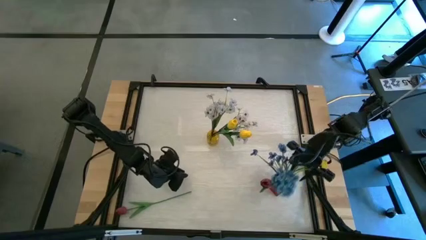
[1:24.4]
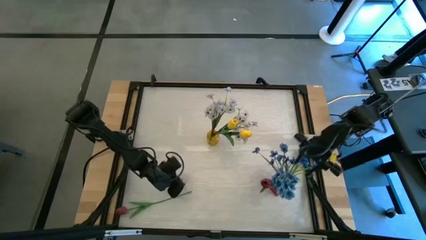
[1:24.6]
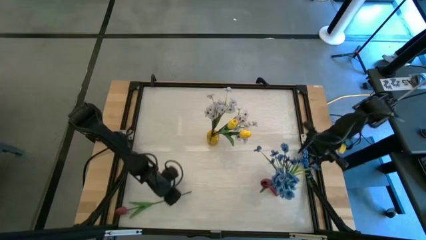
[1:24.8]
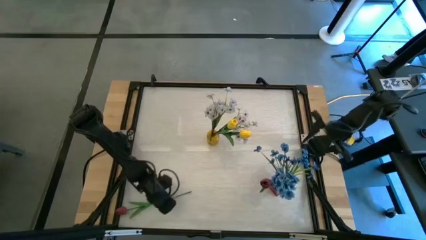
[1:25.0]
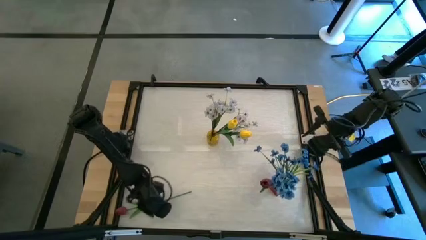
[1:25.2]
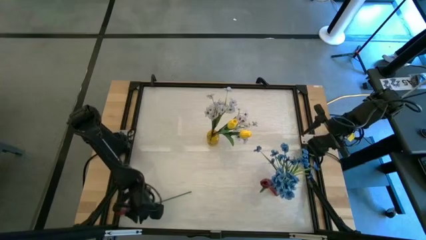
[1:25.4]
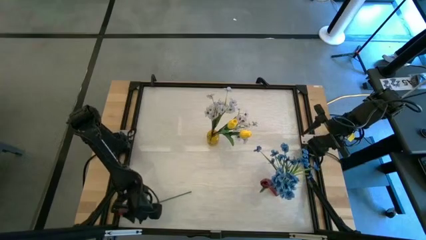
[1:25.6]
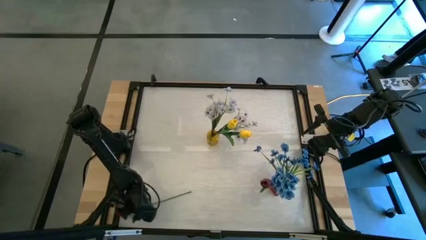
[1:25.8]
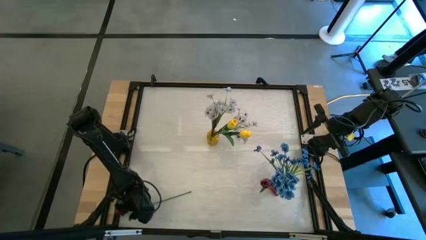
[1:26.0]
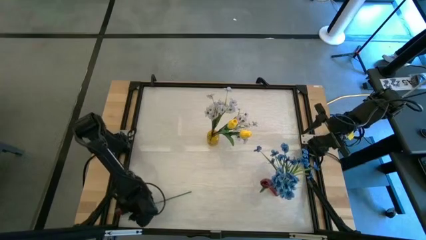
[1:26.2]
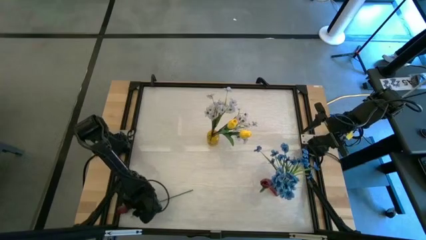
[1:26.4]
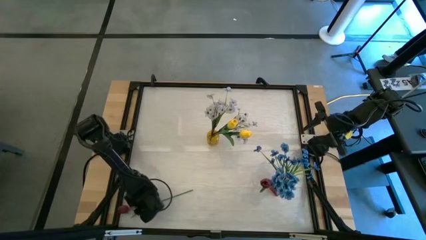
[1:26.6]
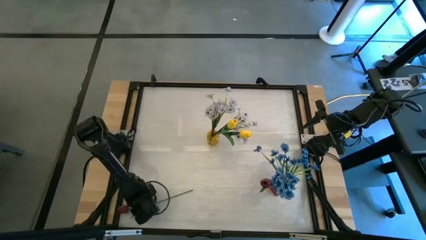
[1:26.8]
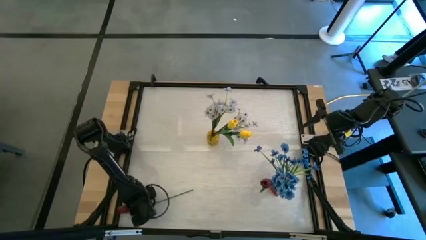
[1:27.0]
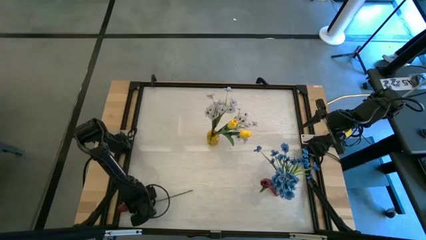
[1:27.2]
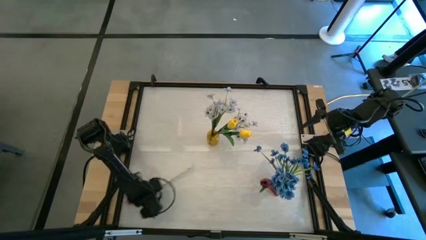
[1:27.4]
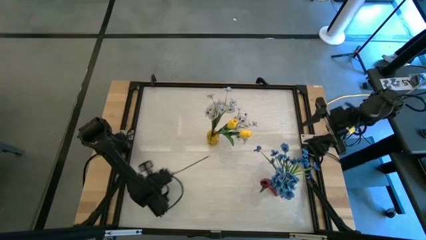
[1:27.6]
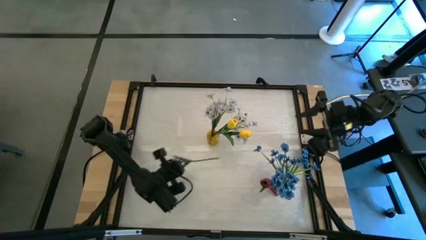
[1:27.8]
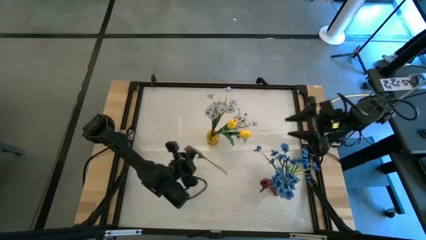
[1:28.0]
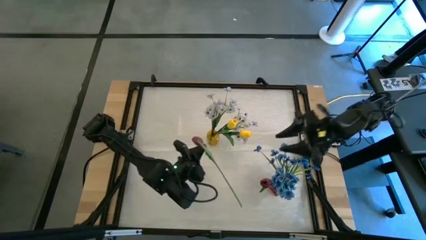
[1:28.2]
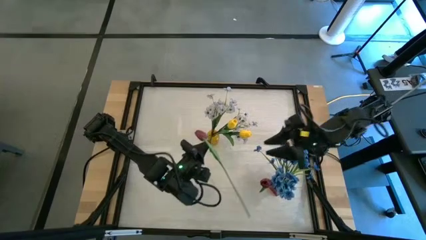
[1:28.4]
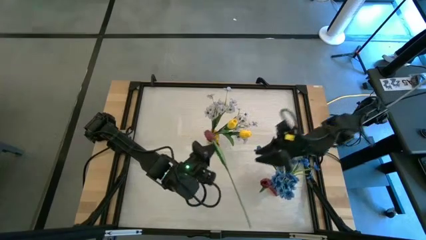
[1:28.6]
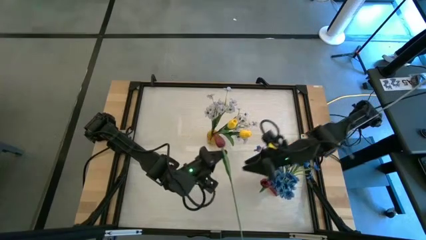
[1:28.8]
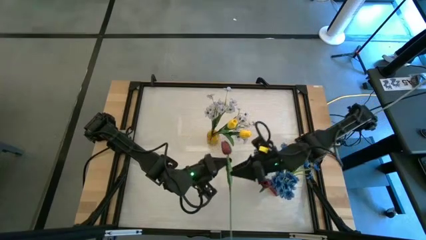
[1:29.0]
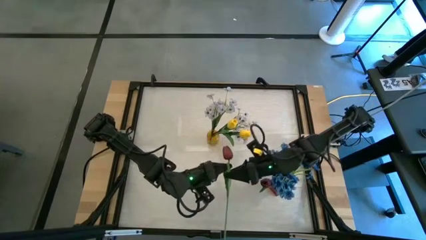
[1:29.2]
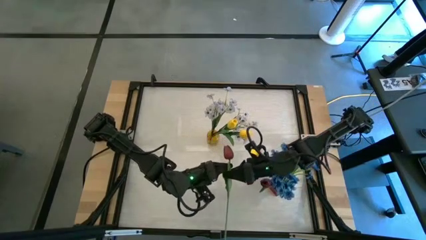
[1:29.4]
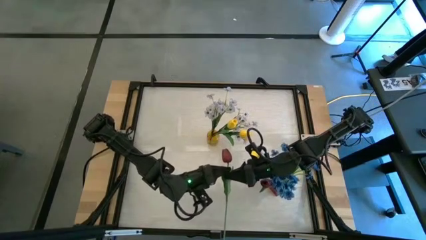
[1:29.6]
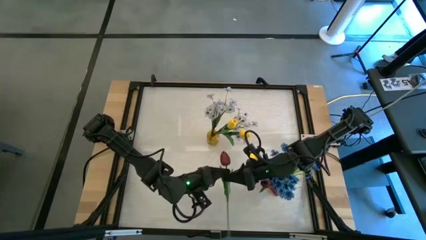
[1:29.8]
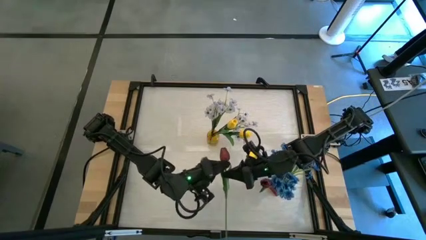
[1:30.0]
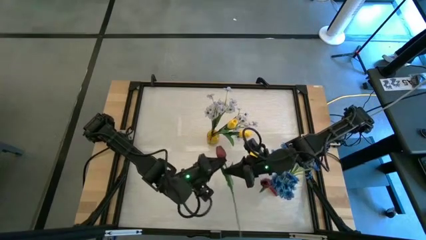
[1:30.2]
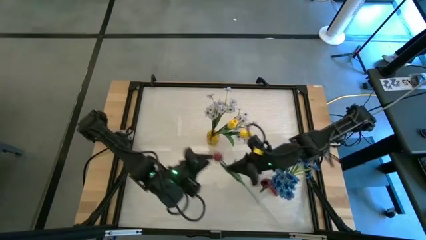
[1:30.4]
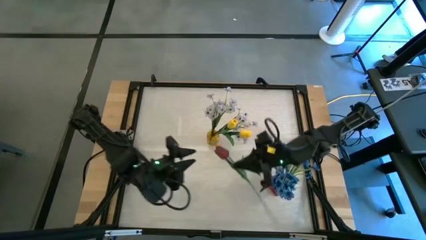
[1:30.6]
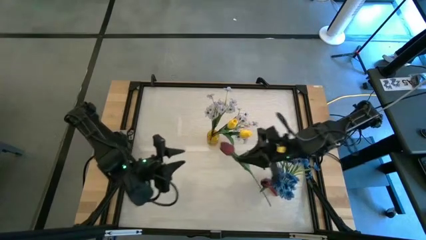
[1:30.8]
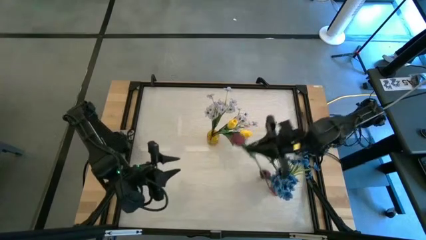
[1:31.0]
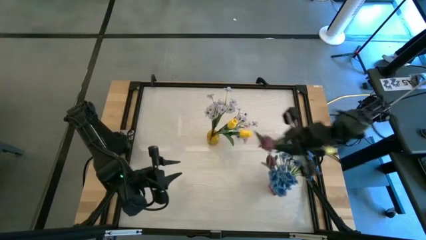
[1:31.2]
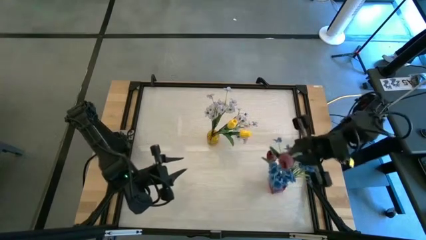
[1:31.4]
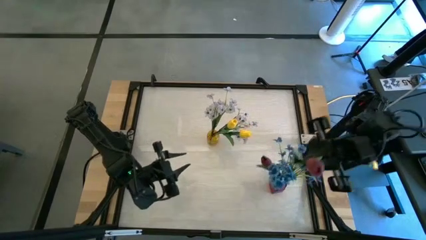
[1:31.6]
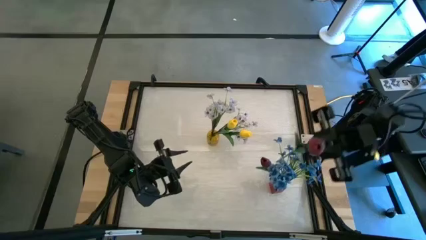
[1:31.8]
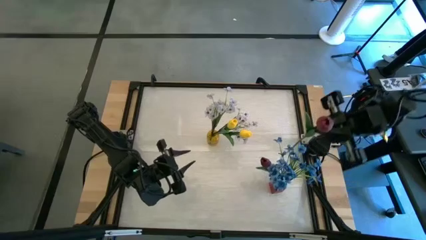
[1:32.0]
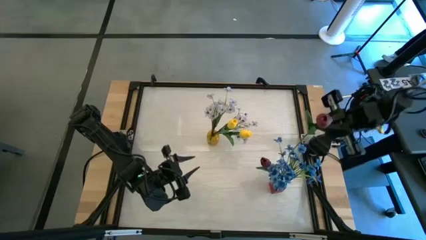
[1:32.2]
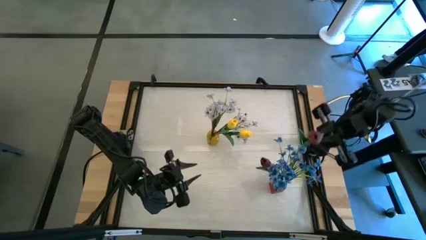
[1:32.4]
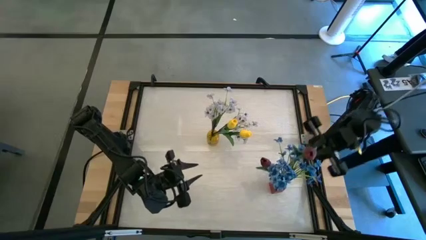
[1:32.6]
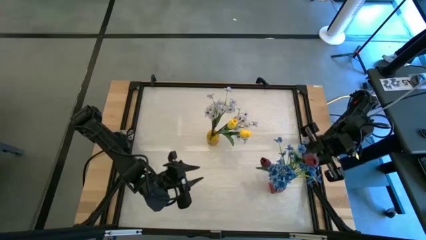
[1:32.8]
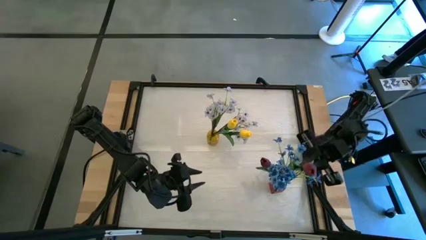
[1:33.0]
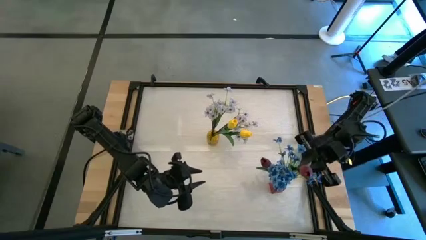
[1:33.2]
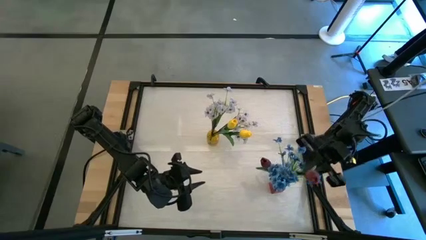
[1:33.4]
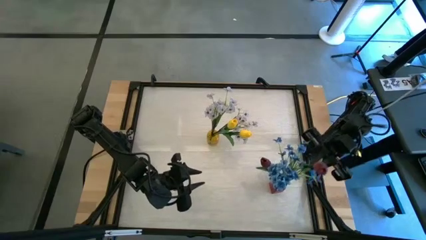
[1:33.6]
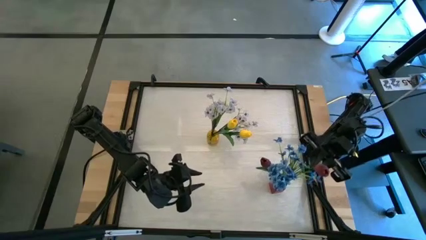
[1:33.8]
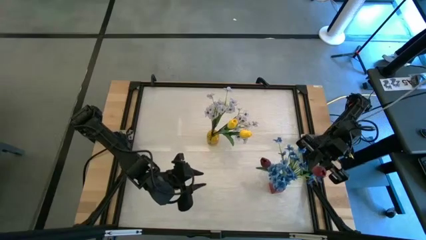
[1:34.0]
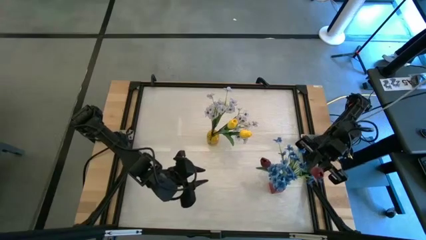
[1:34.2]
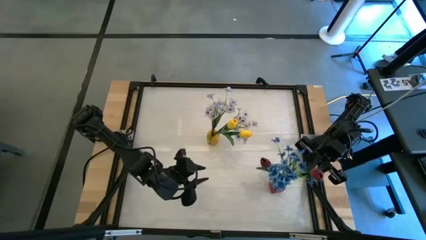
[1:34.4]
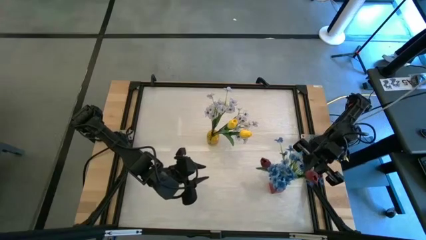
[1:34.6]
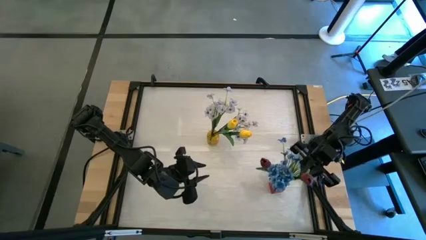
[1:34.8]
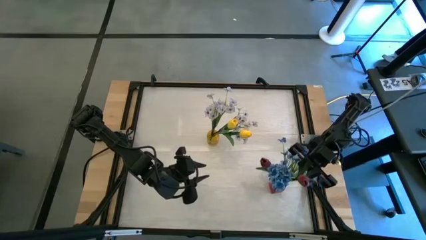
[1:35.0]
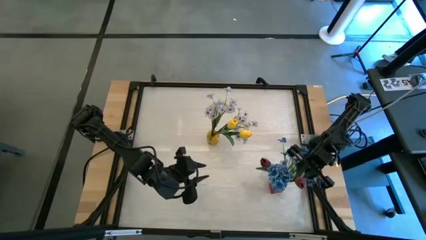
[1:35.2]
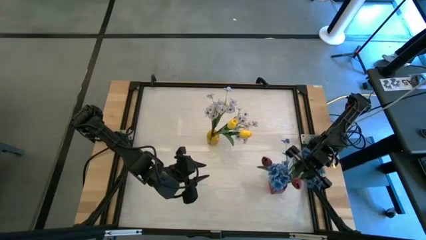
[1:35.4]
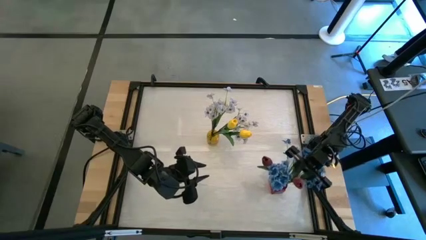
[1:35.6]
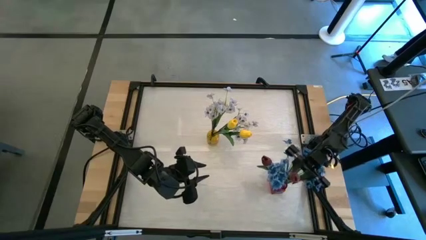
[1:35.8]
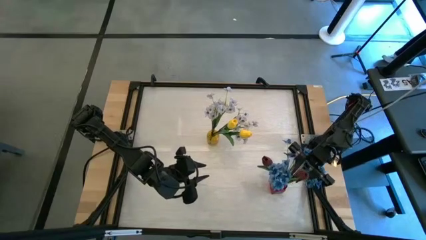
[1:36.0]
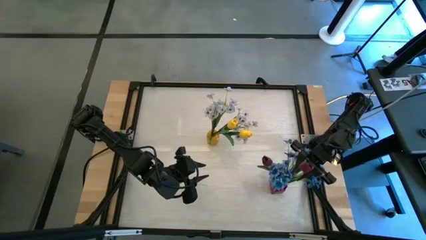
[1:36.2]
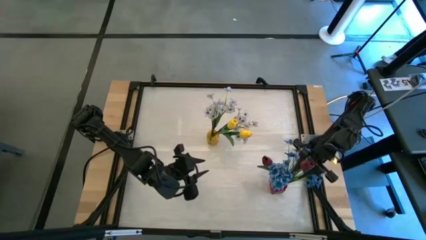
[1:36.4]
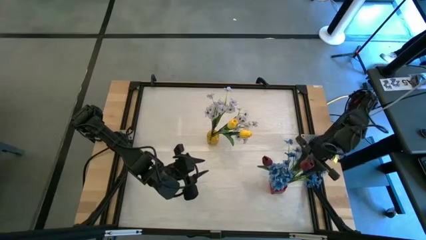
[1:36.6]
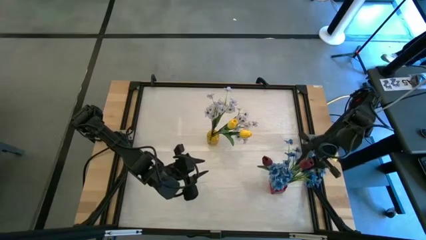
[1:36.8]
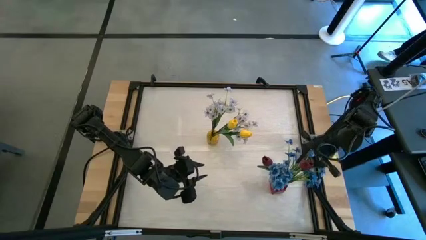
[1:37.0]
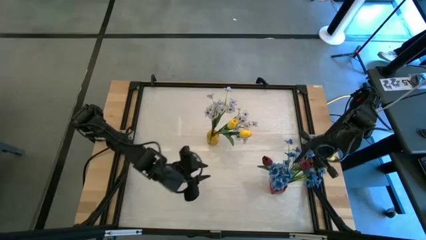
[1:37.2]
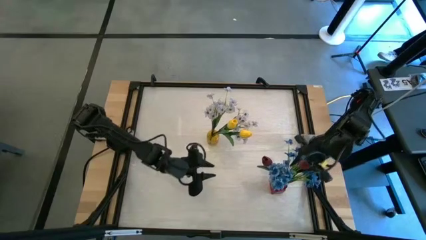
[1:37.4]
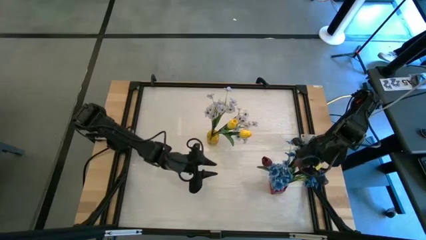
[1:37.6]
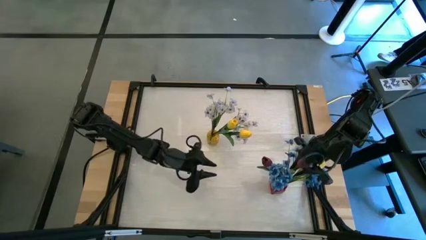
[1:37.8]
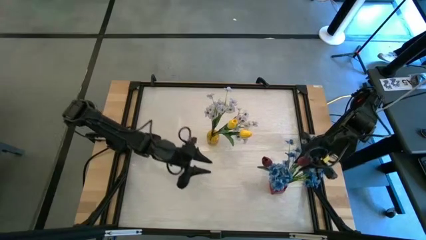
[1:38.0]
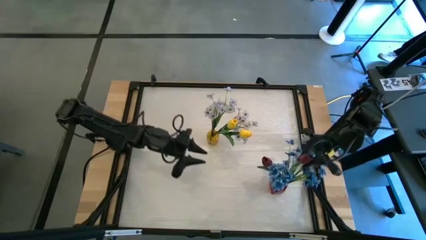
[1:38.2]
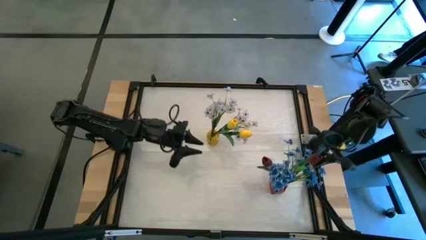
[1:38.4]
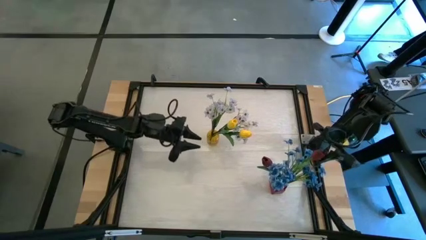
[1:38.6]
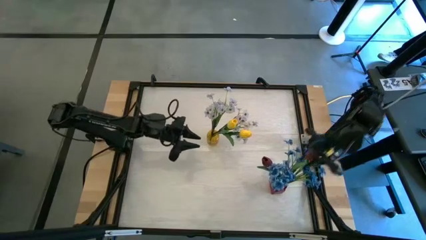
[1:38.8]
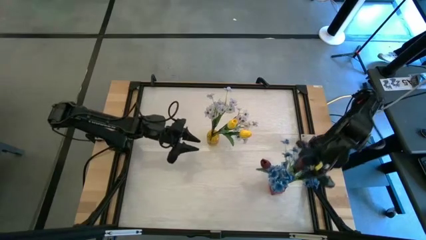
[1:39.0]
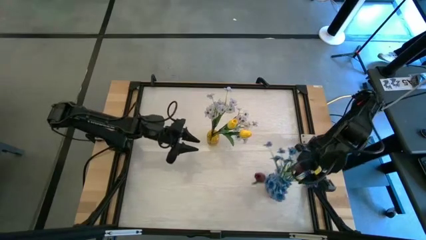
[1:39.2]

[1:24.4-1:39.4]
Task: Sort flowers into vase by color
Put the red flower into the red vase

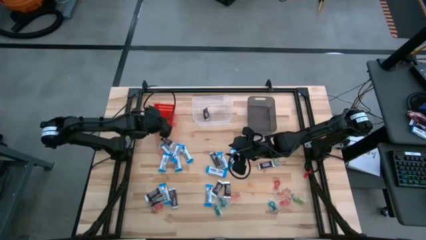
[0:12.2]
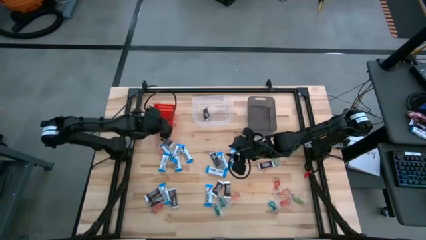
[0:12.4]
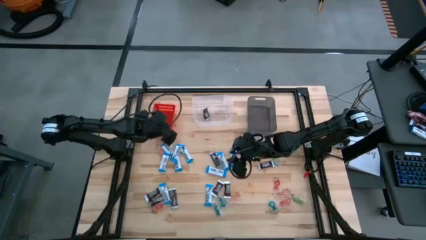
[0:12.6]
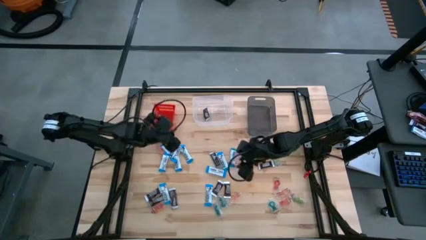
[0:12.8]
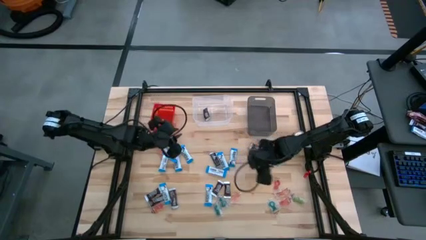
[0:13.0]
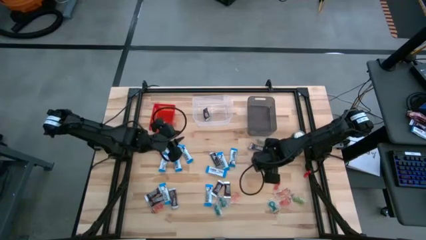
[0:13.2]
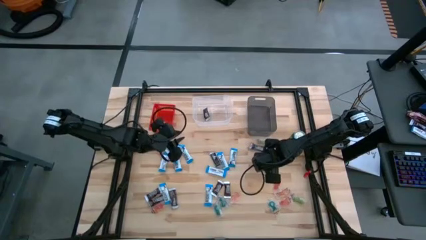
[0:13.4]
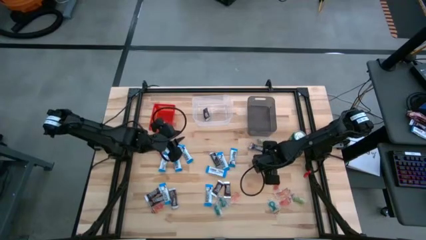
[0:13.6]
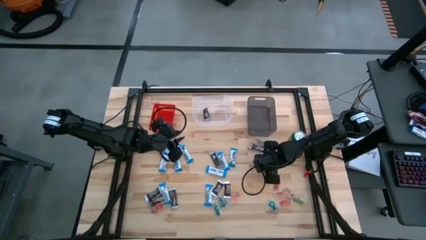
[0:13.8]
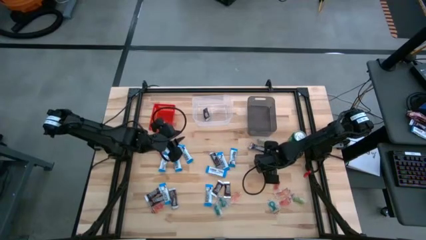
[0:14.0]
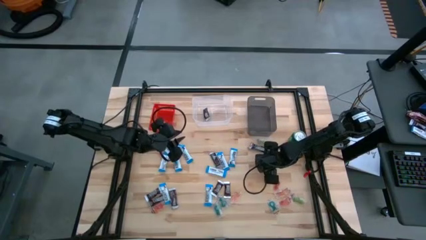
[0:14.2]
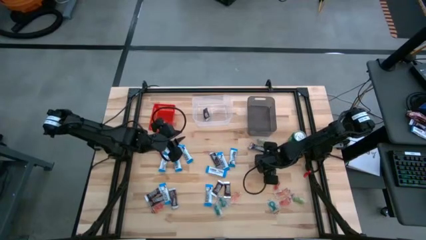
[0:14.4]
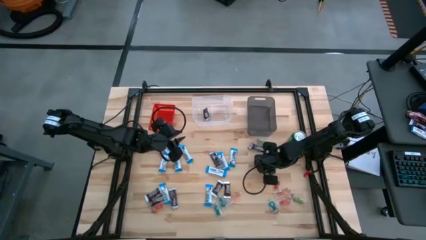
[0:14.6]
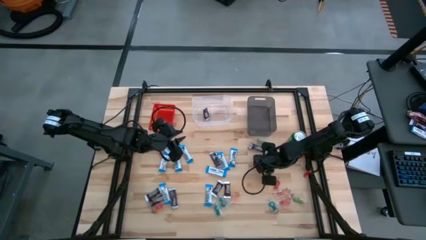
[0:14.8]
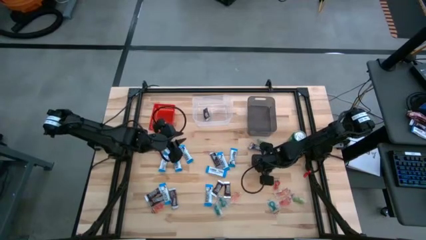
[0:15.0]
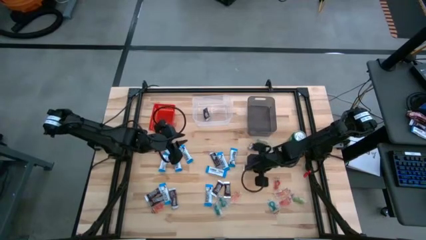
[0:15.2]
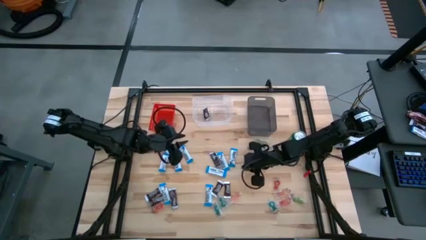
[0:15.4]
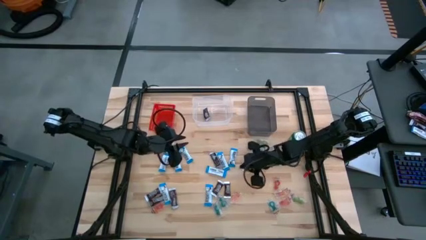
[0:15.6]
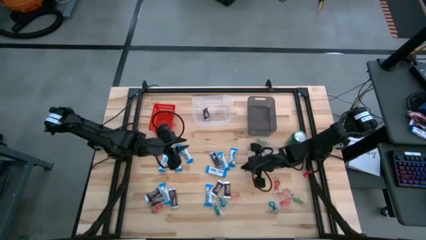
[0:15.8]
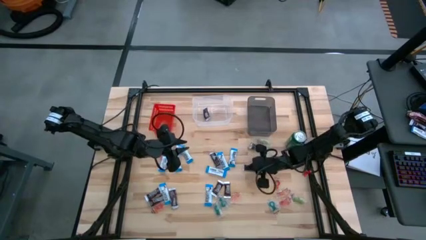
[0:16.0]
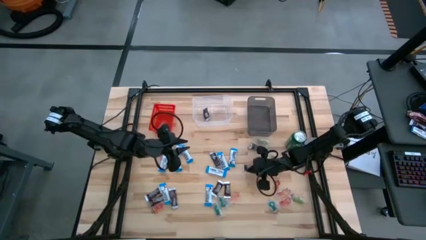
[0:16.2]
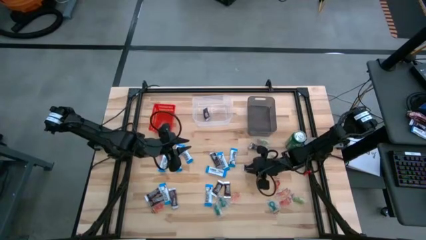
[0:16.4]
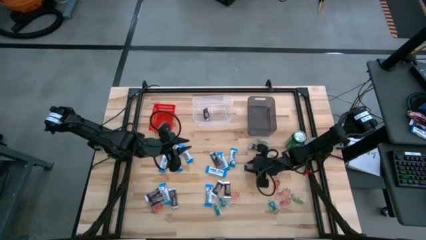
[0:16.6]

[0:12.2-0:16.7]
Task: Sort candy
Put the black chocolate bar into the transparent bin
